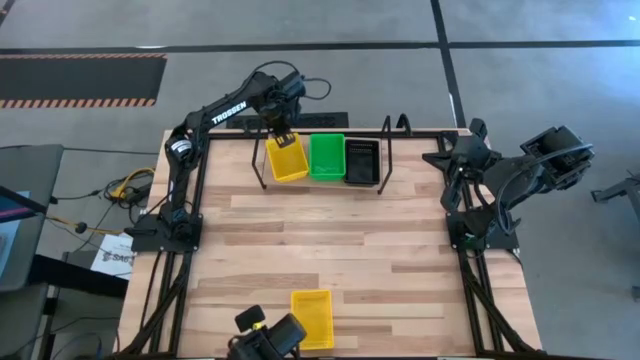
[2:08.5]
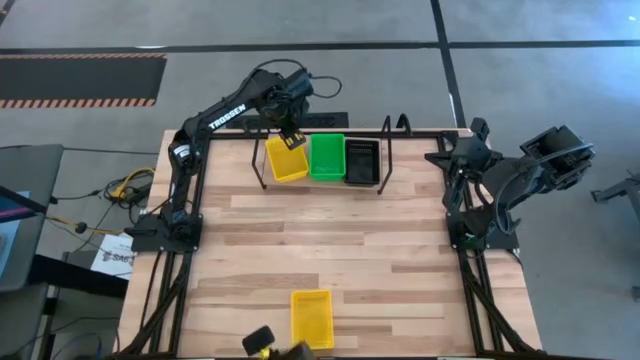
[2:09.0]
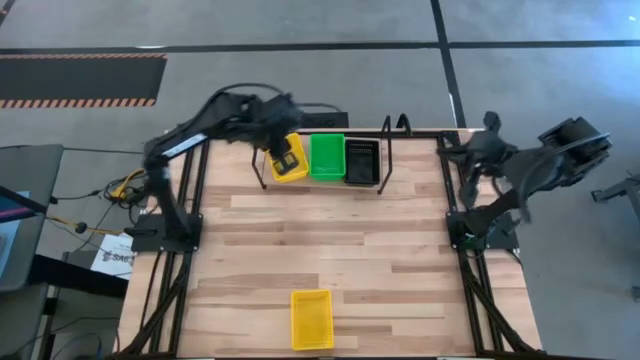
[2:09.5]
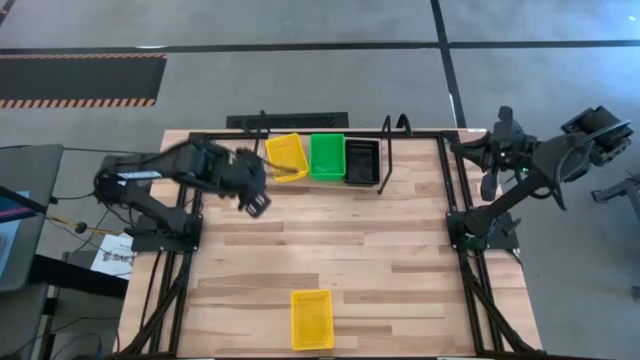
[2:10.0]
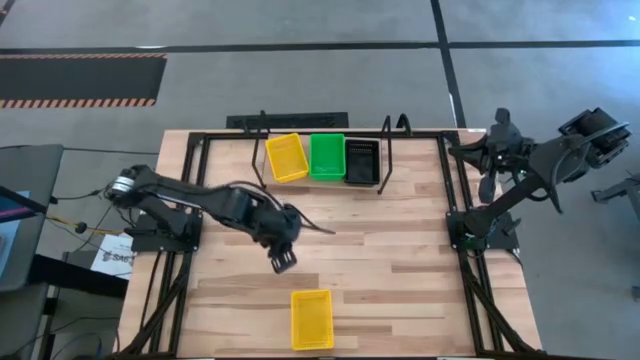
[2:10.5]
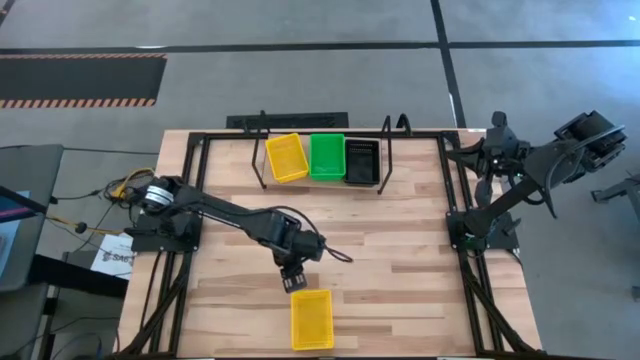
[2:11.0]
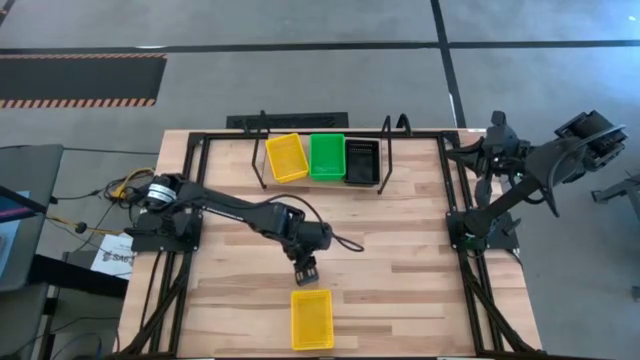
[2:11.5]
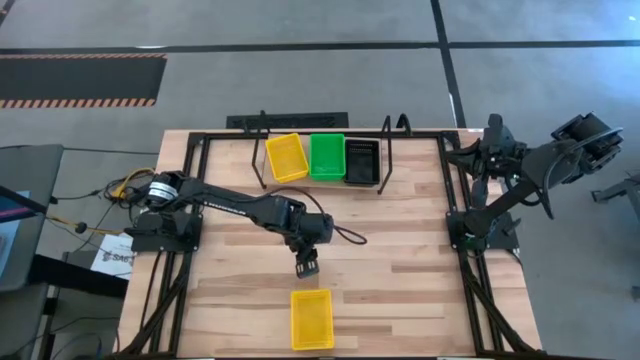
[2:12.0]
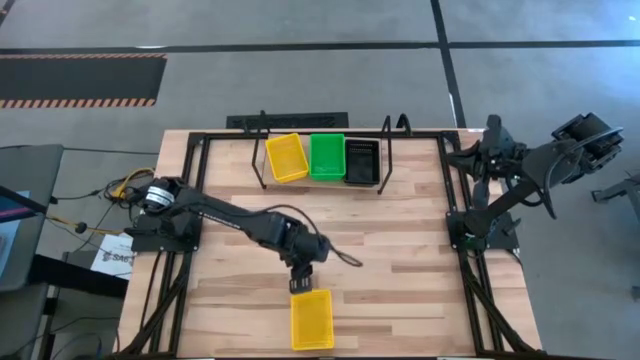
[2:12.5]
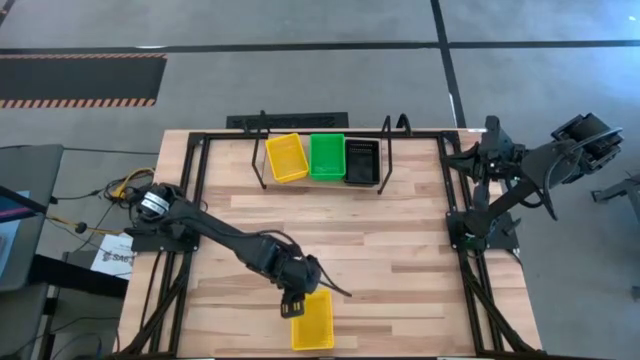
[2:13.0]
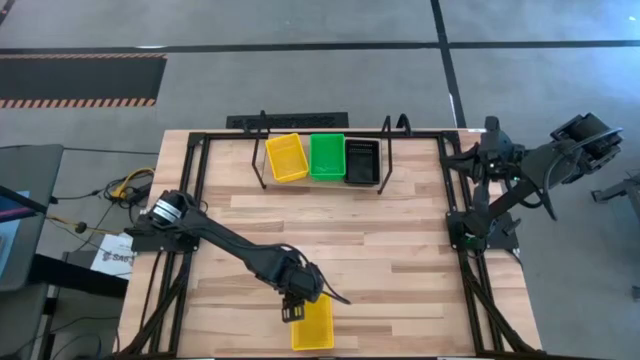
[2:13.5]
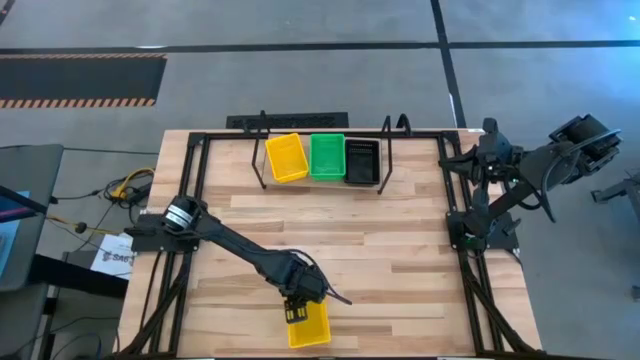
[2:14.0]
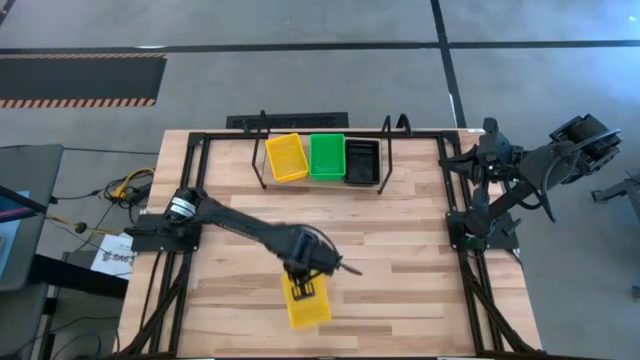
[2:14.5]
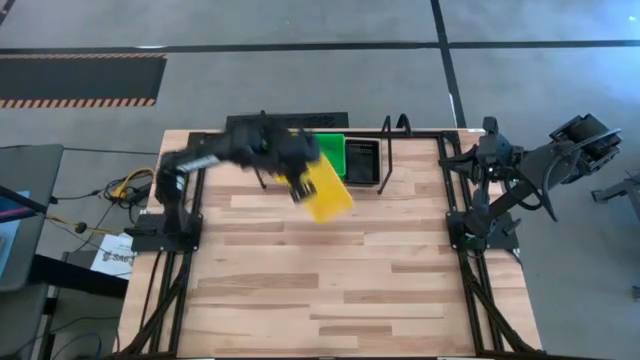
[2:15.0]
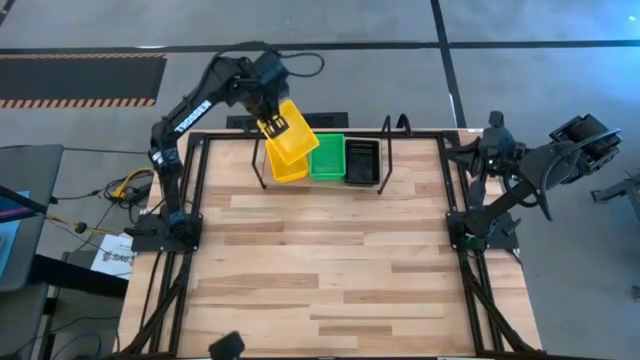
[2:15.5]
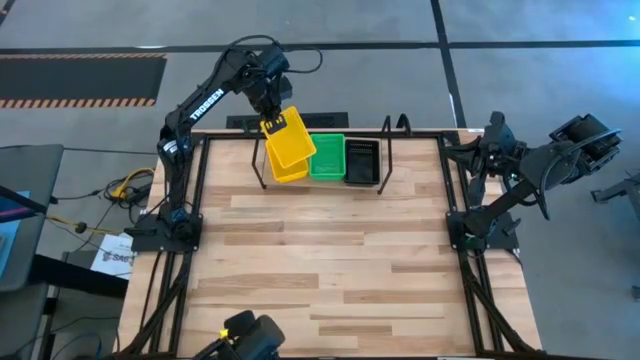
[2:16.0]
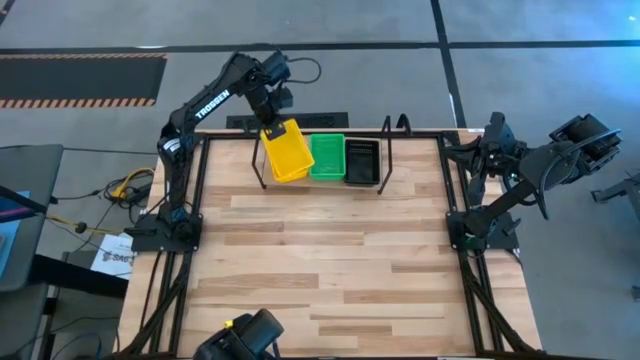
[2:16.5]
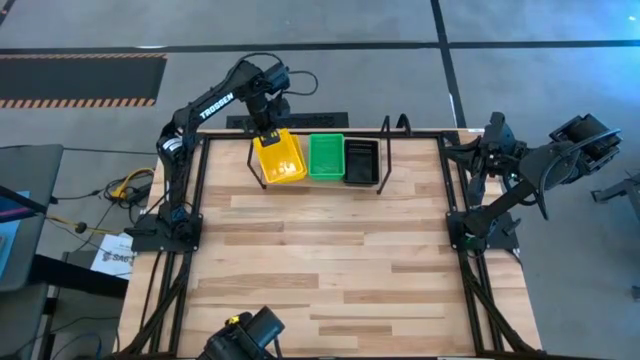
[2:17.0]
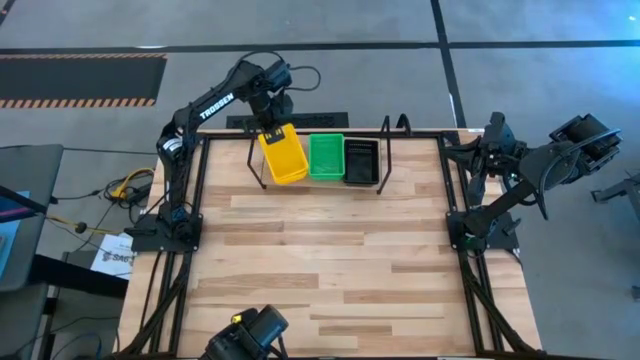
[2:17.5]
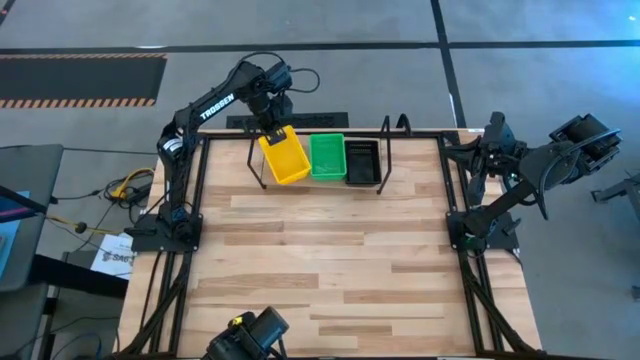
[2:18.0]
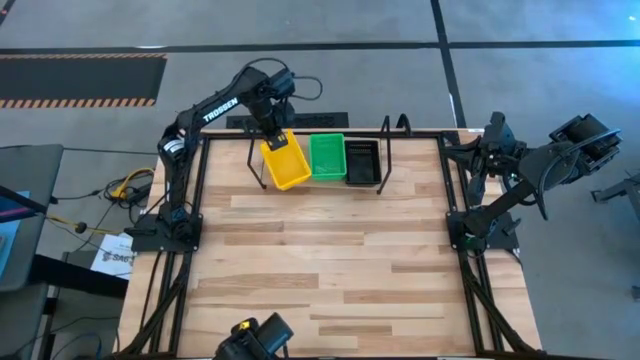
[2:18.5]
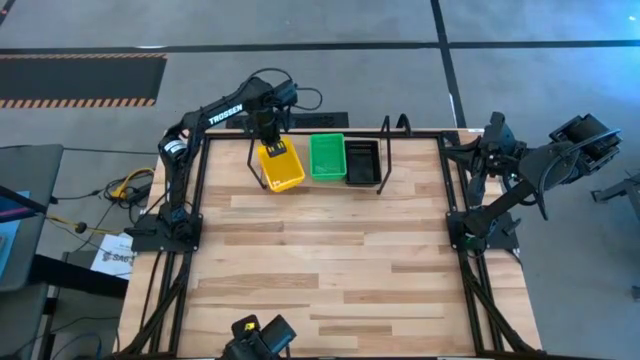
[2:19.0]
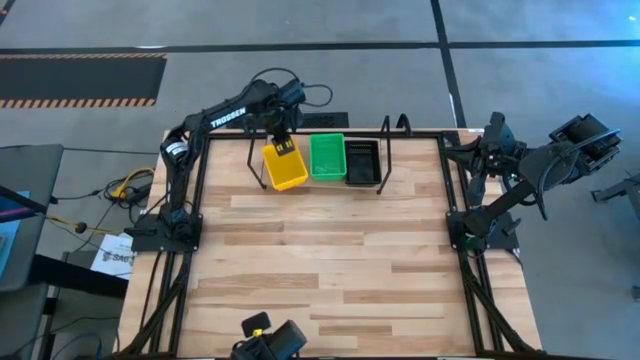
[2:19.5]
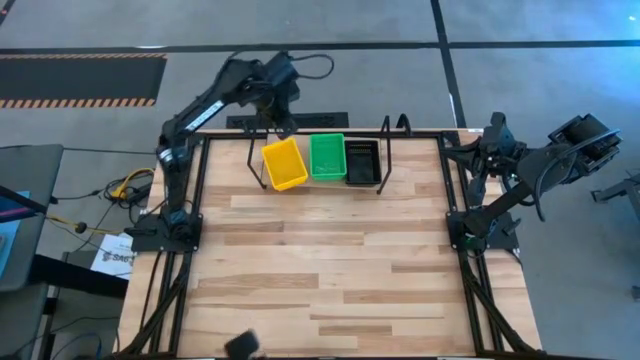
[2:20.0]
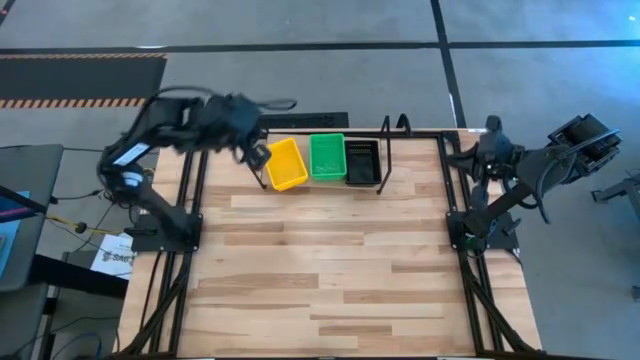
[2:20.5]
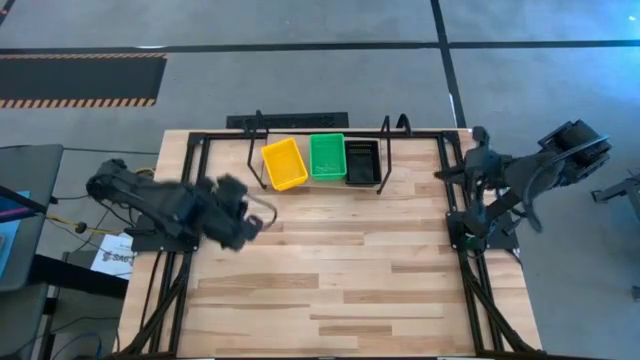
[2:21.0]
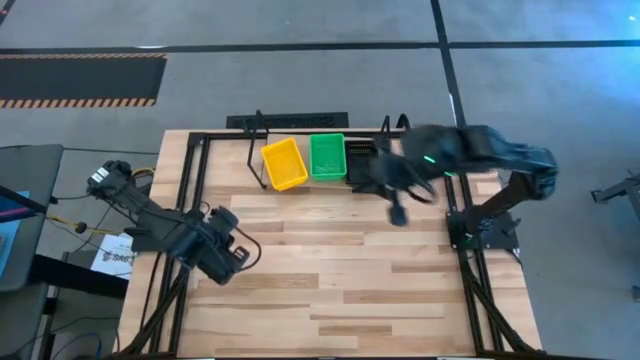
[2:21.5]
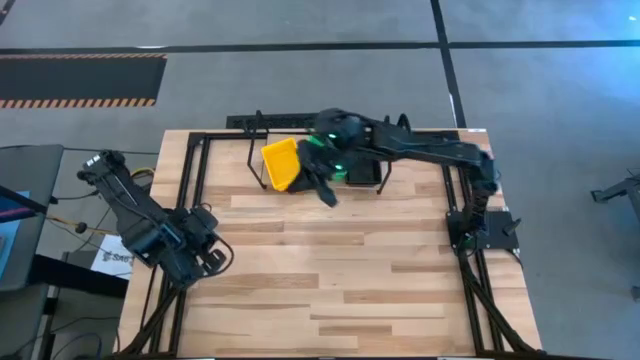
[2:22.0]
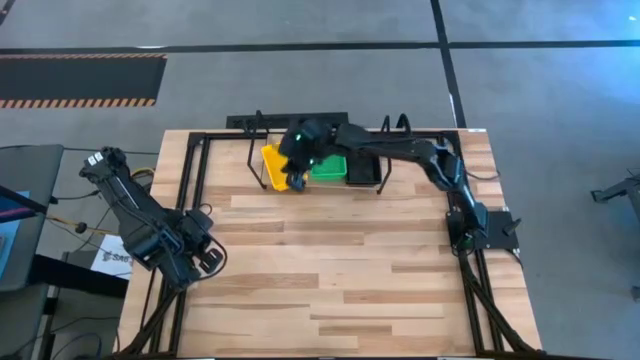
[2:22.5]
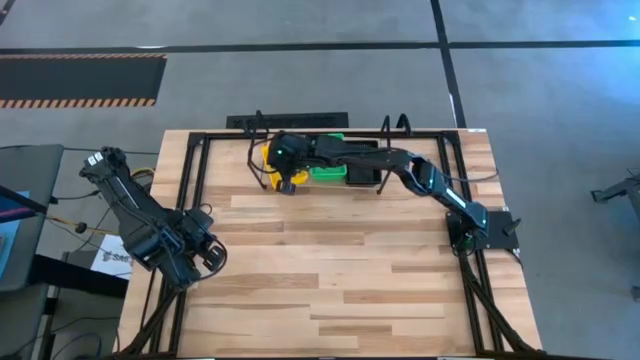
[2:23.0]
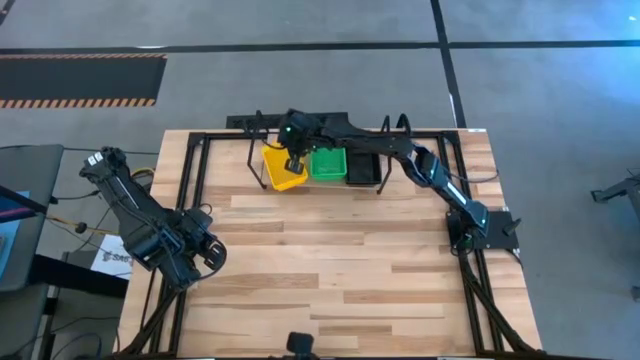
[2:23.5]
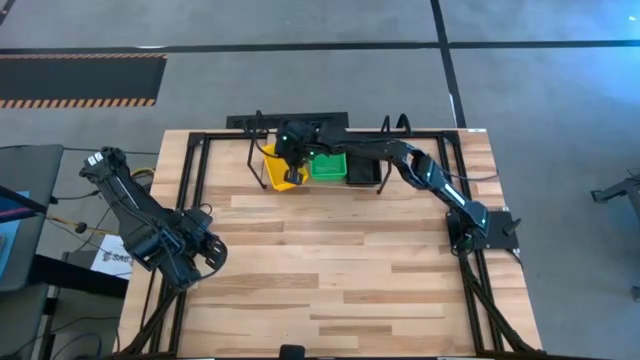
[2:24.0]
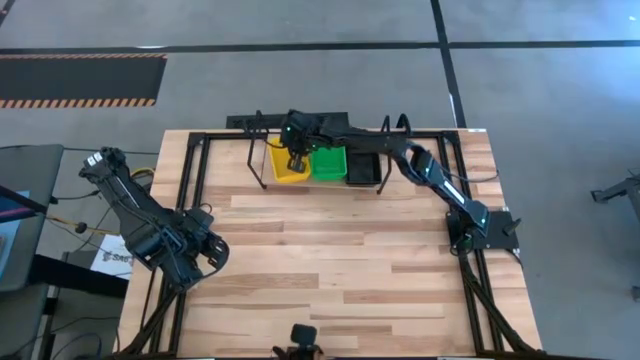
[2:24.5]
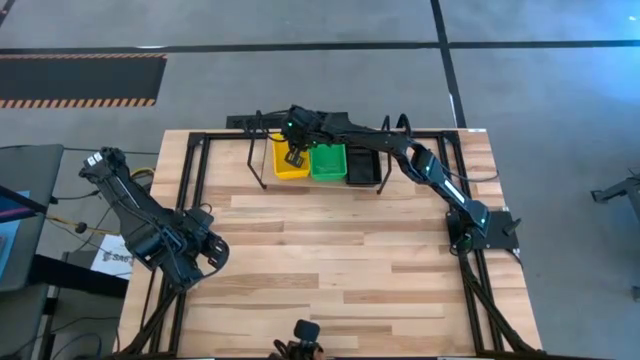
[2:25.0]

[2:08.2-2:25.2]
Task: Stack baskets on shelf by color
Stack the yellow basket on top of the other yellow stacked baskets on the shelf

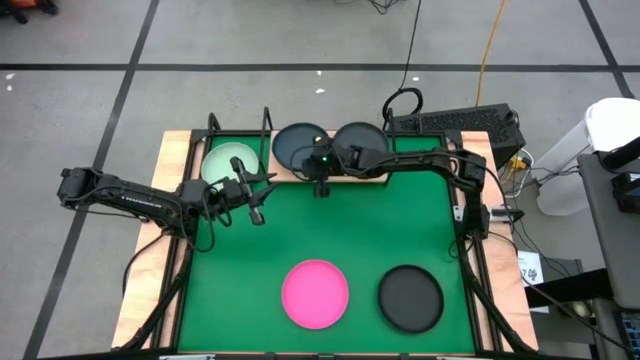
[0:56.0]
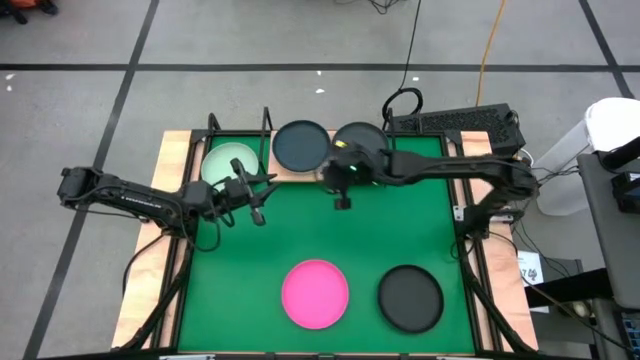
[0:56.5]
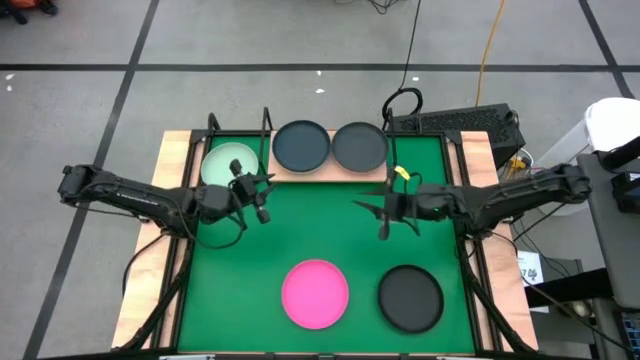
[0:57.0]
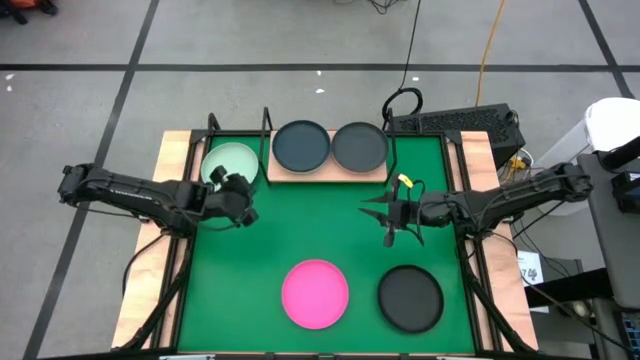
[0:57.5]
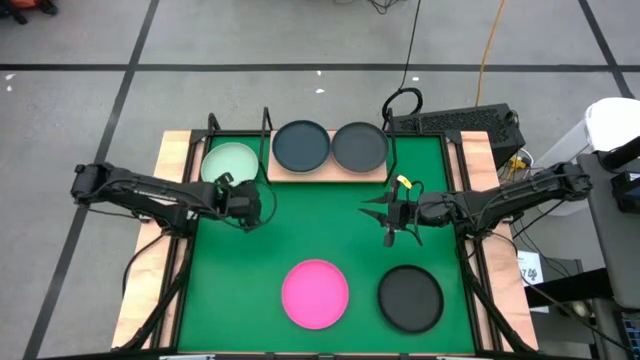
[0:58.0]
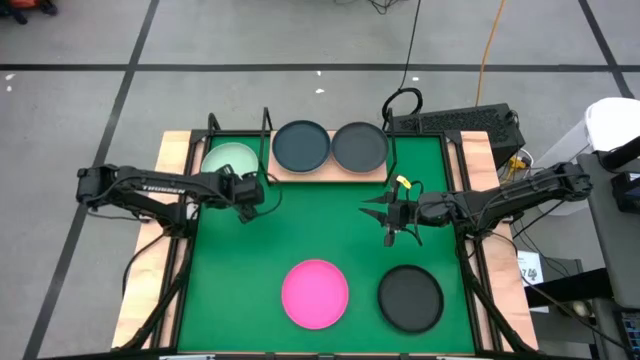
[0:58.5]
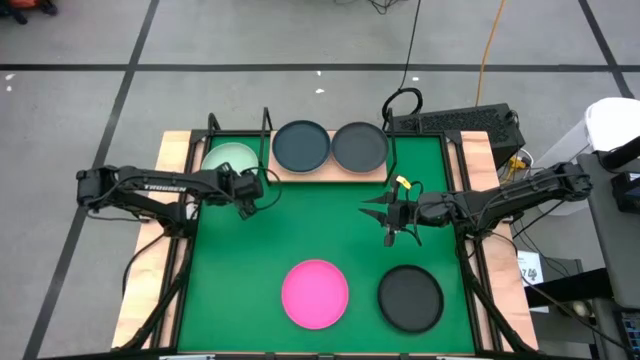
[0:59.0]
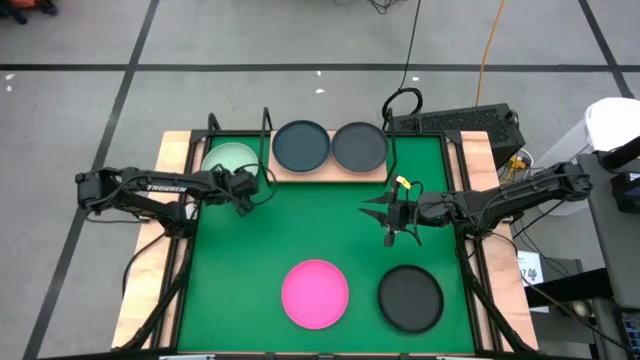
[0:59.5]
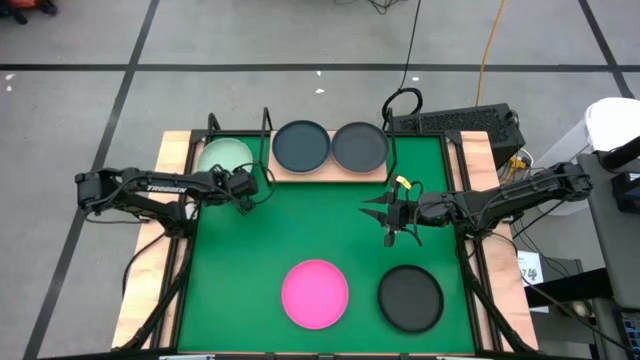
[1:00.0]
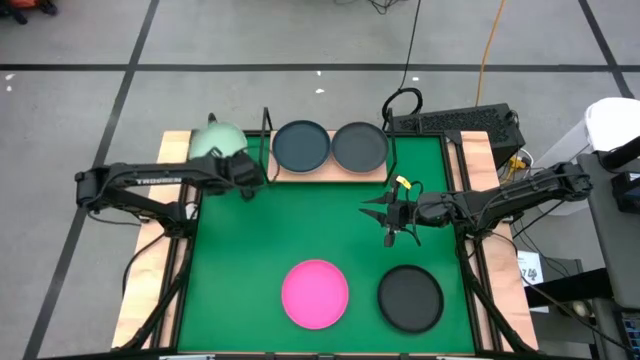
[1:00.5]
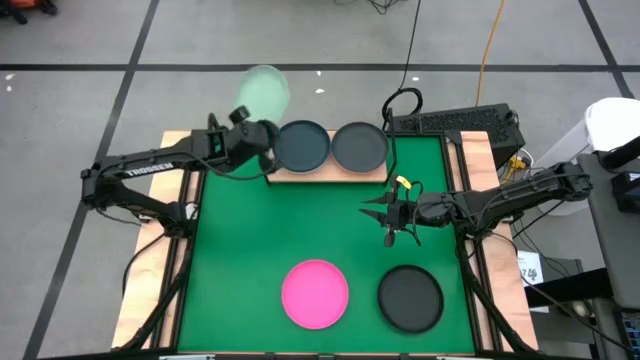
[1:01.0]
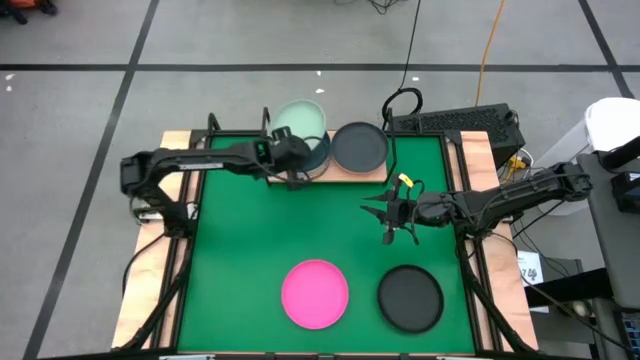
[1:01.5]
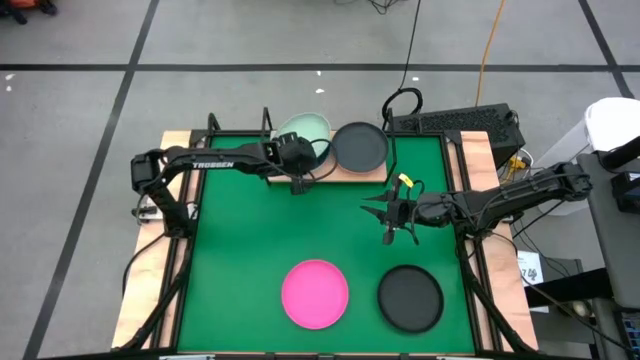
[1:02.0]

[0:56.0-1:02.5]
Task: Place and stack plates onto a shelf
Stack the light green plate on top of the dark blue plate on the shelf
